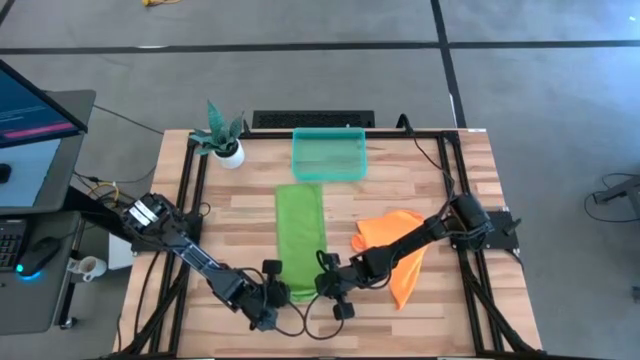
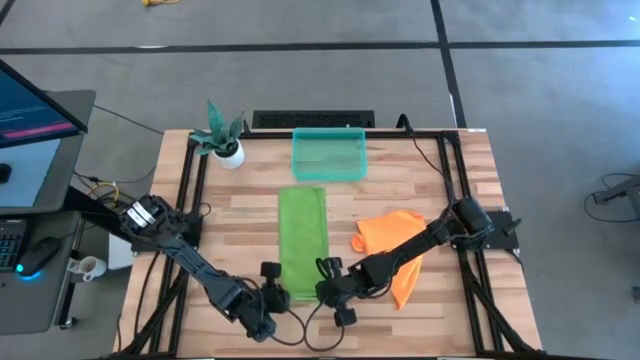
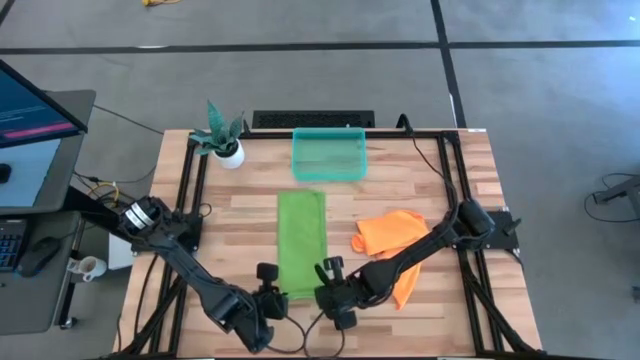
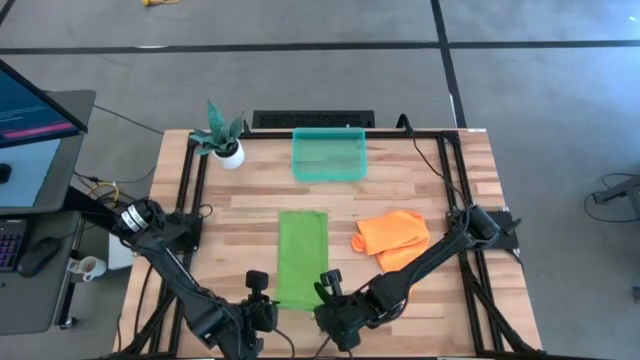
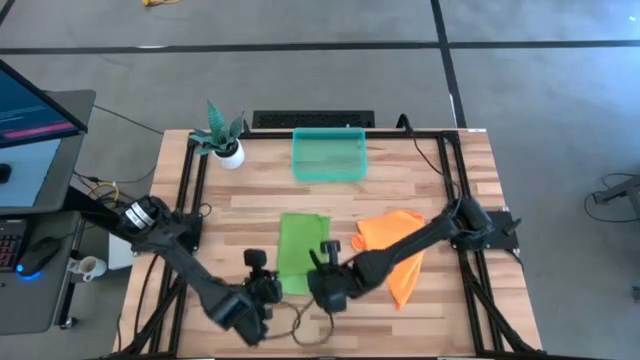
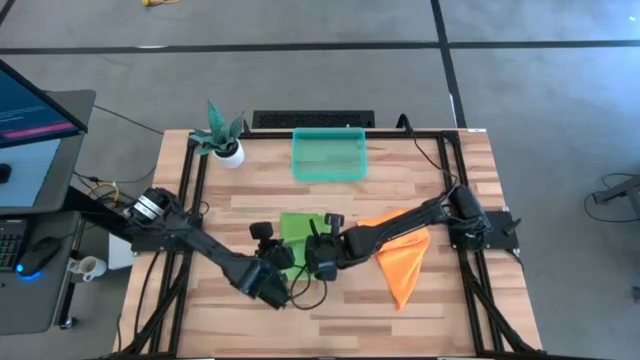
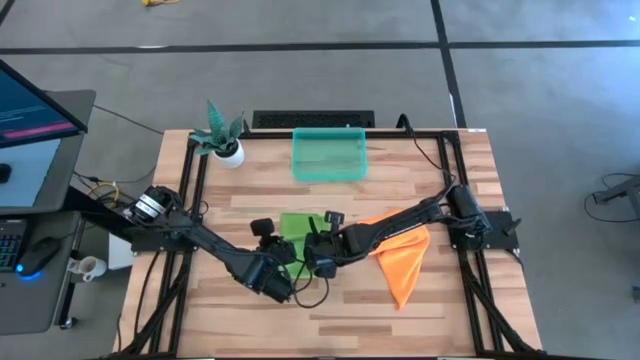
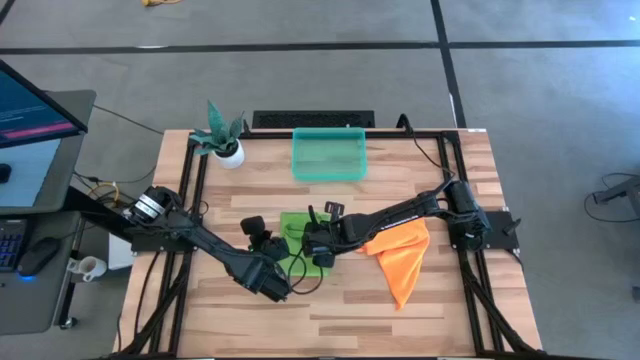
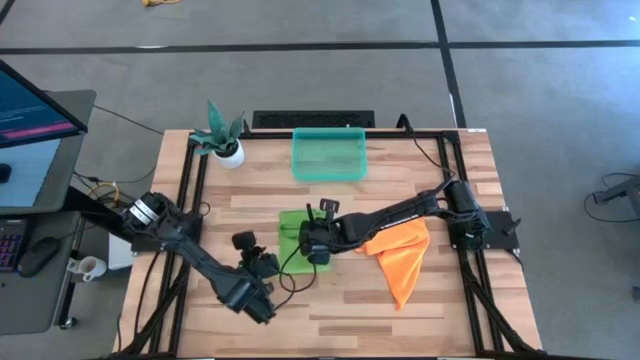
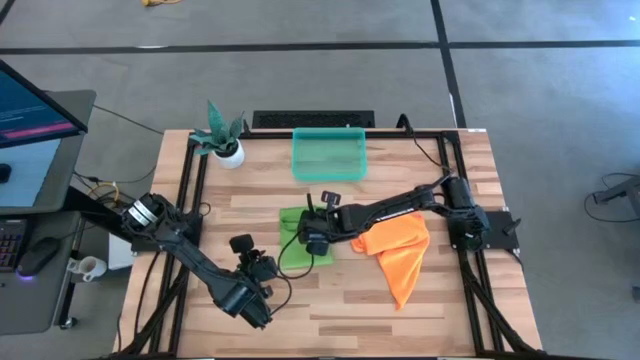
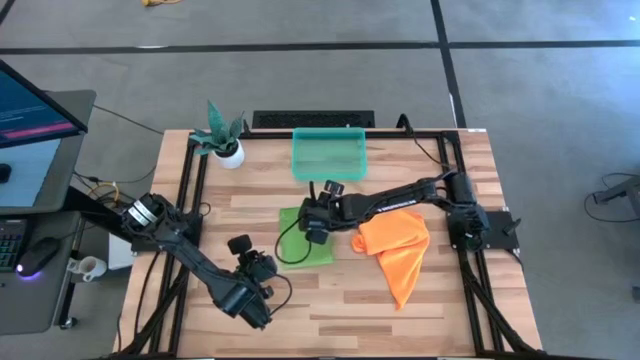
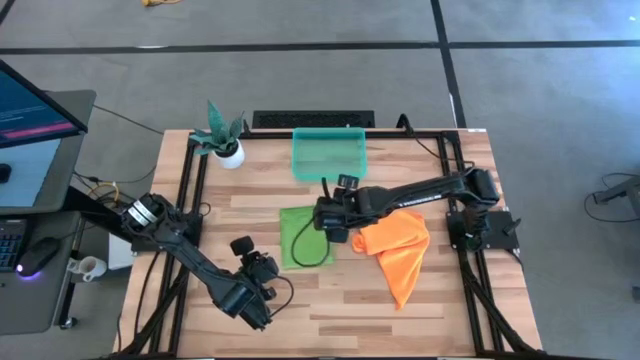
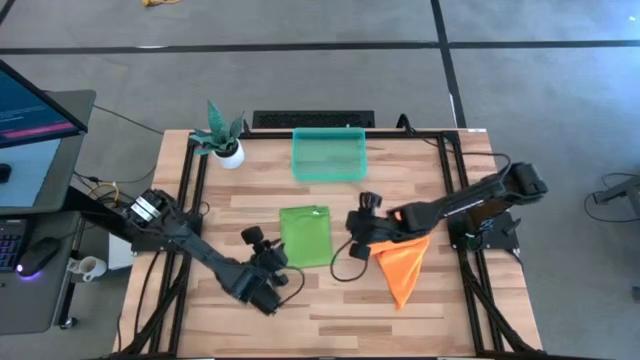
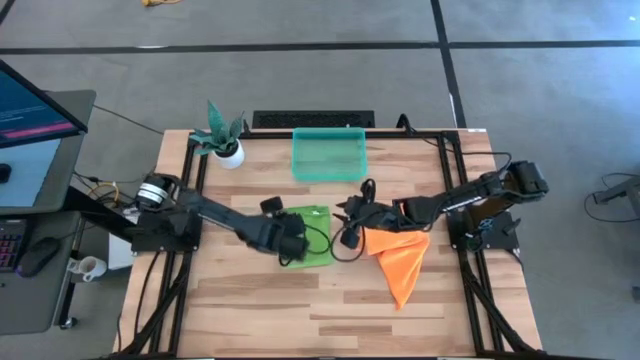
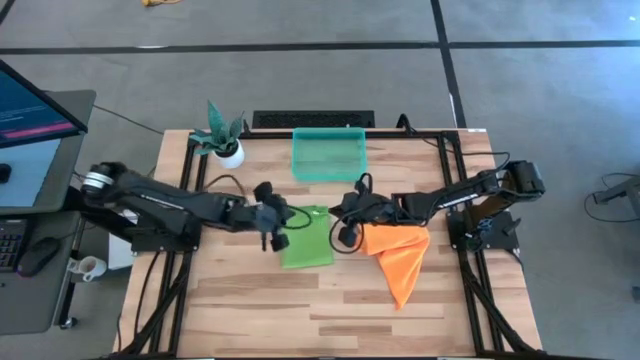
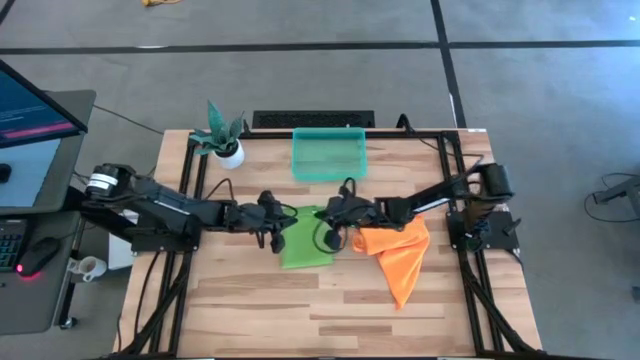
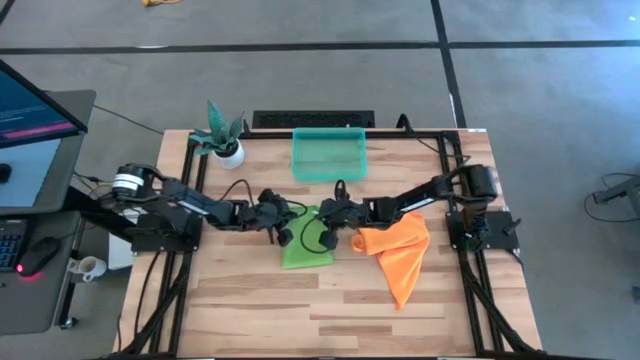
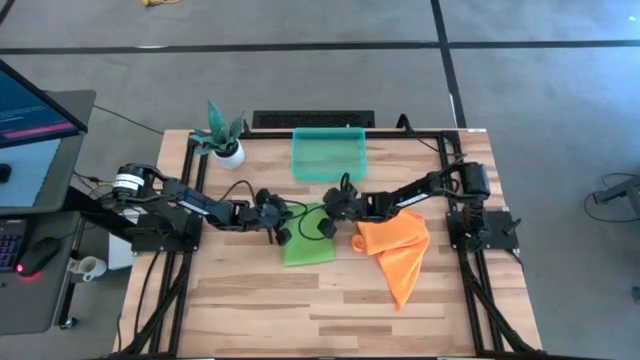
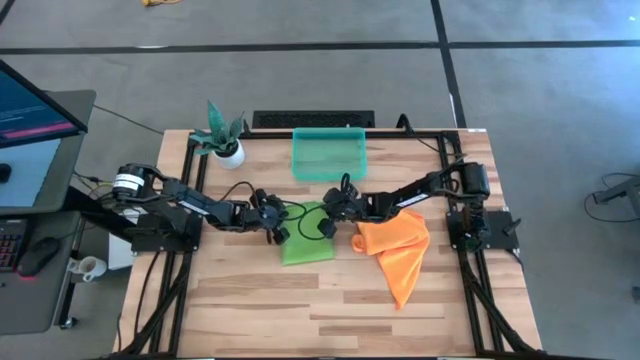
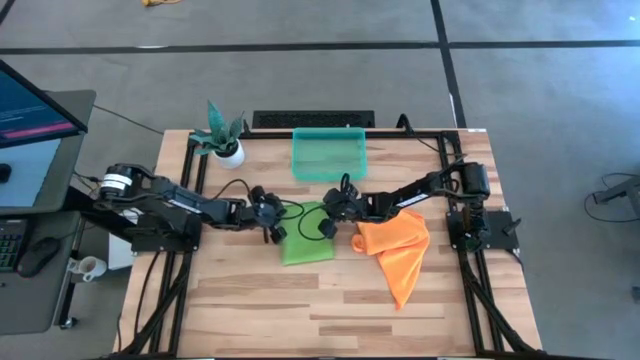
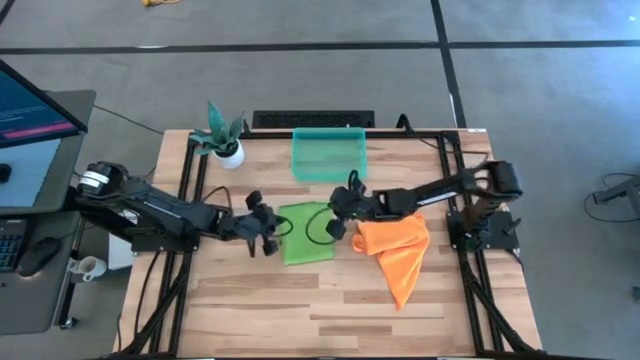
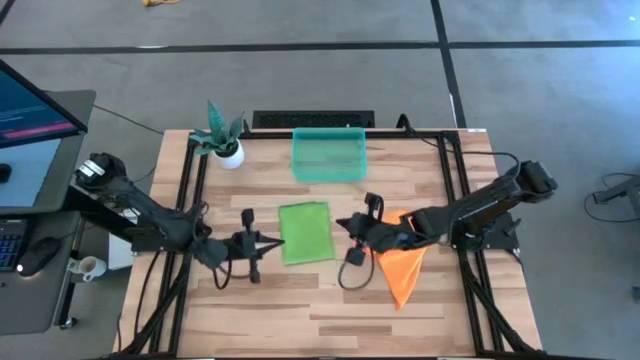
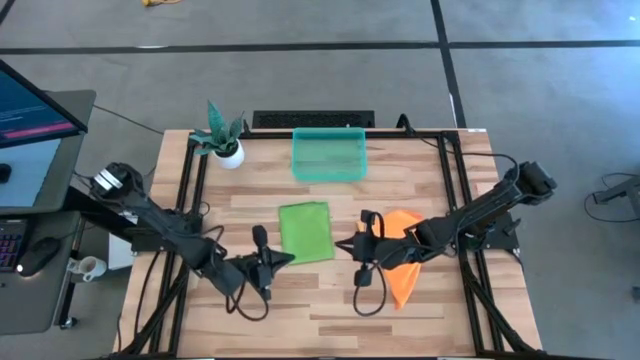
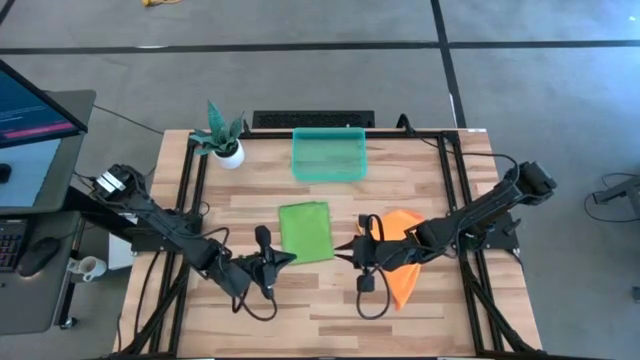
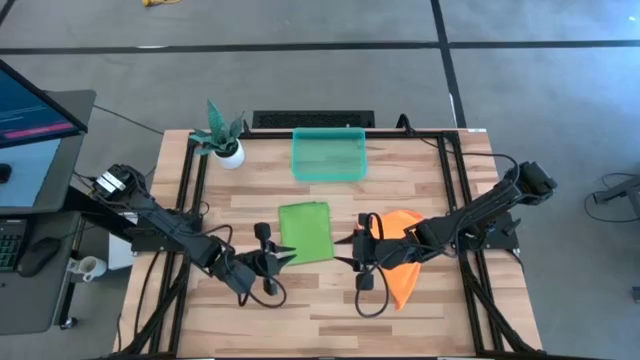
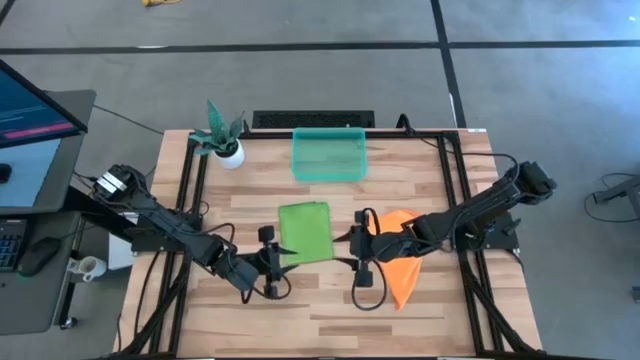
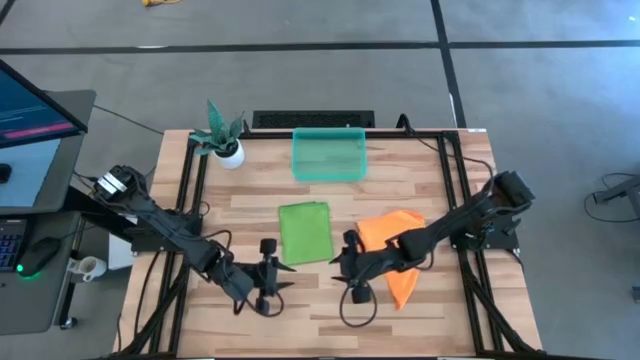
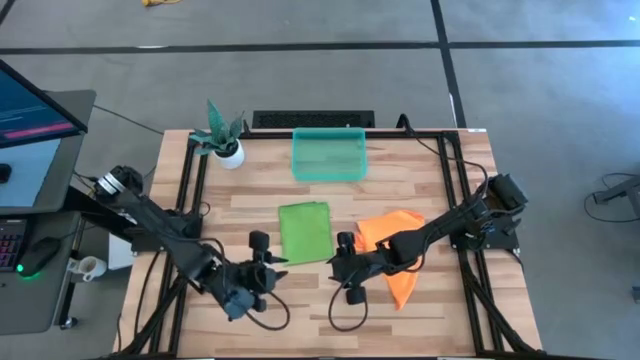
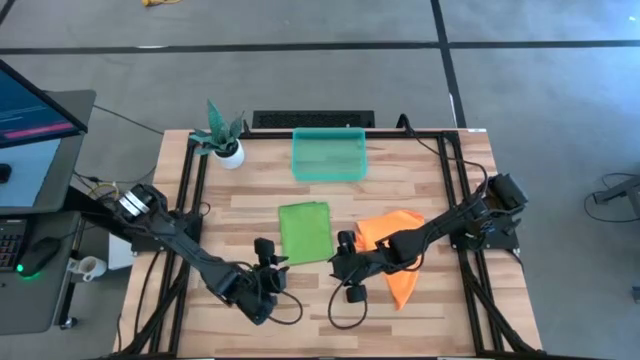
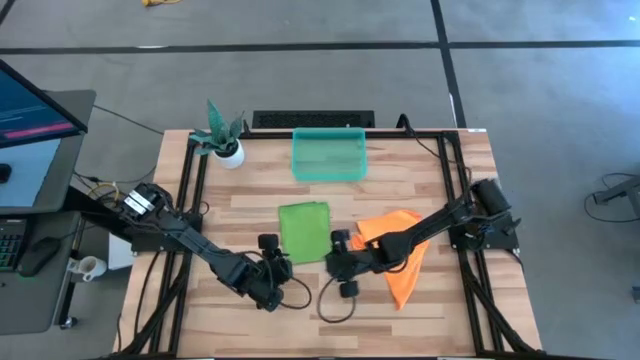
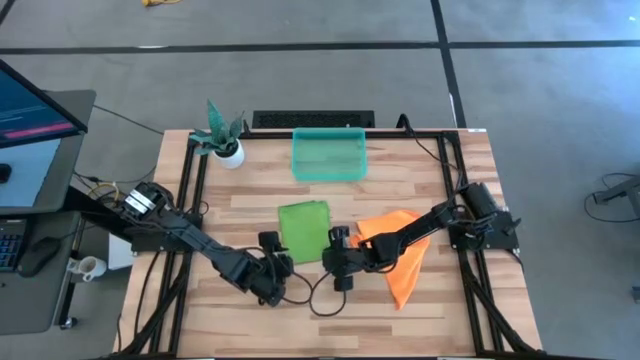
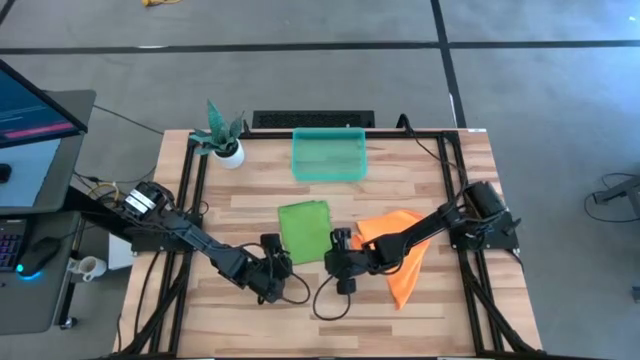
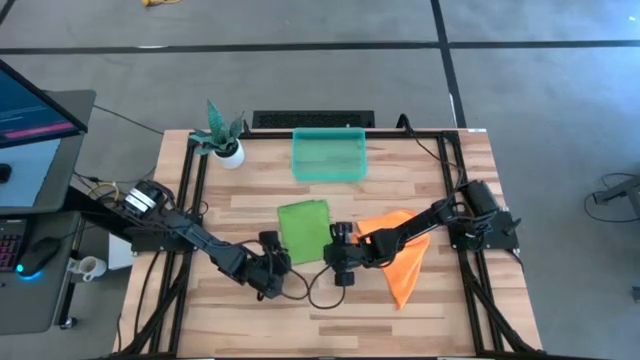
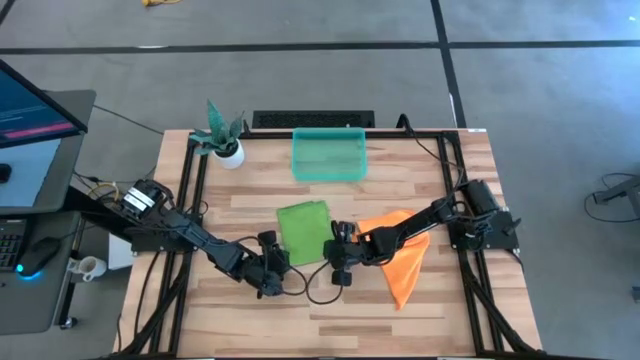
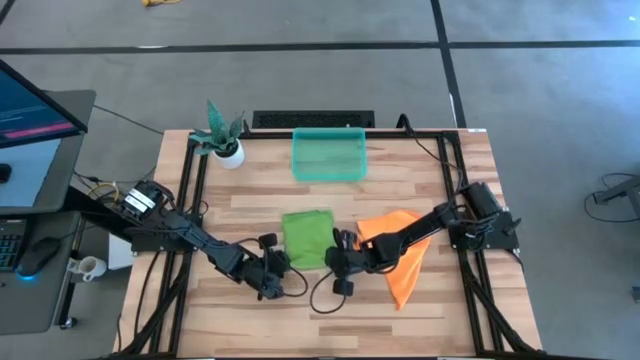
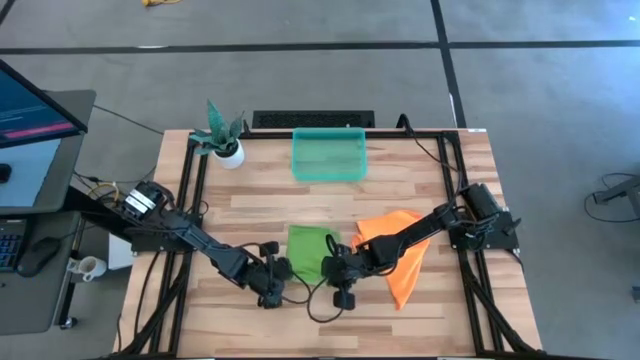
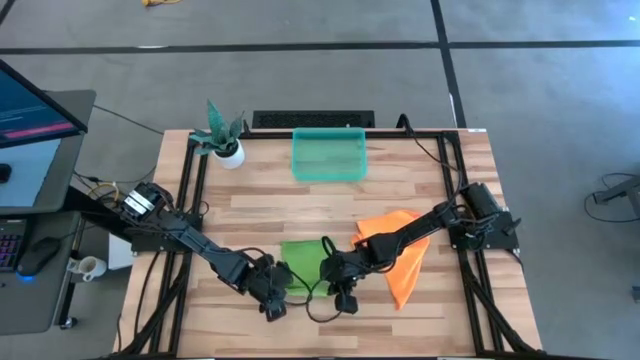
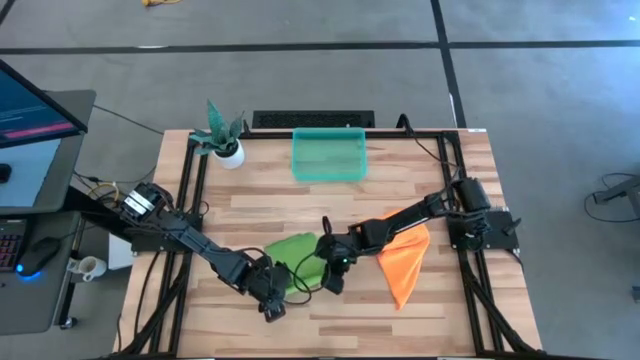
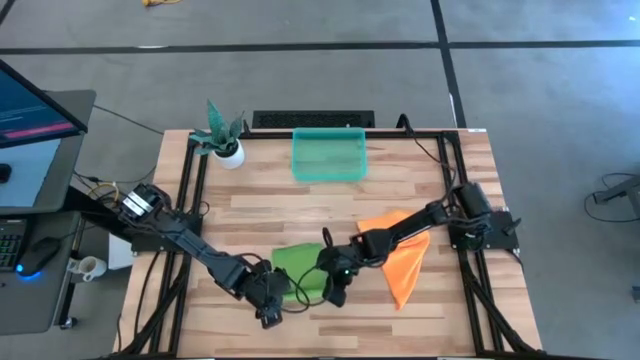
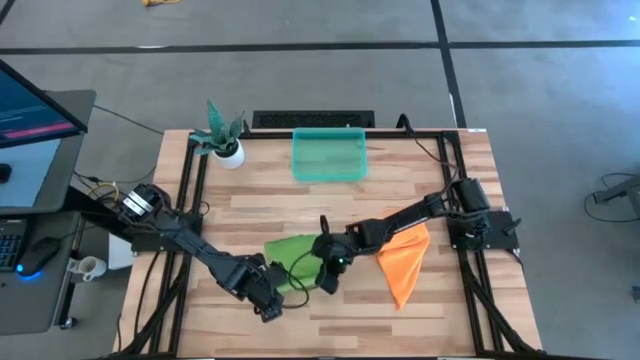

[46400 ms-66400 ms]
Task: Roll towel into tight, uniform cylinder
Roll the green microfiber towel

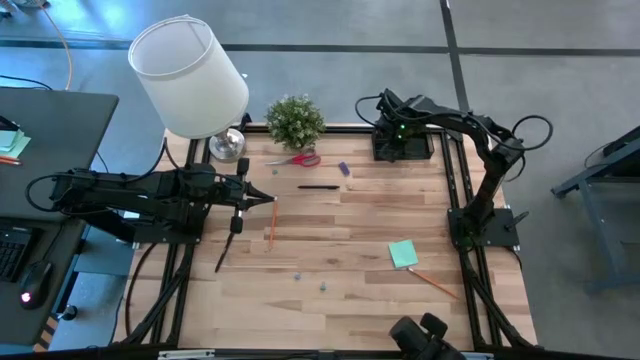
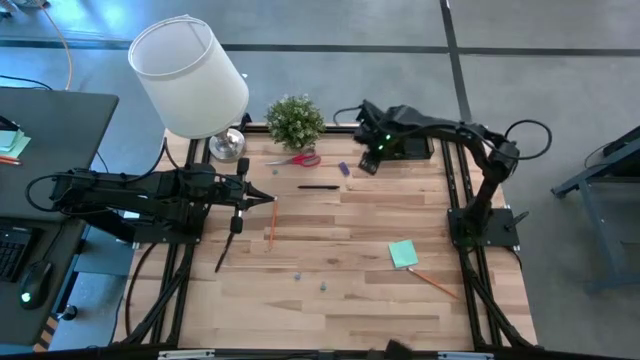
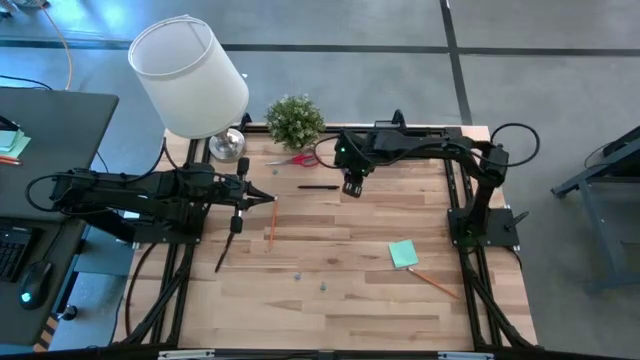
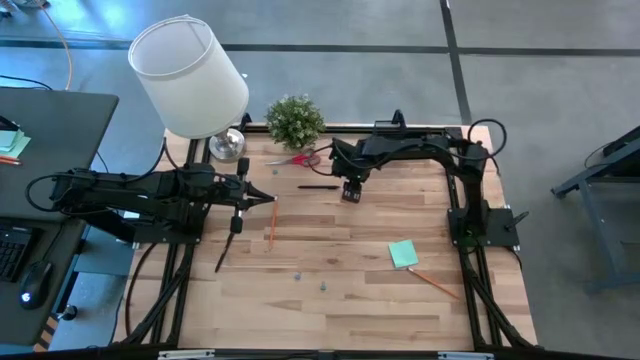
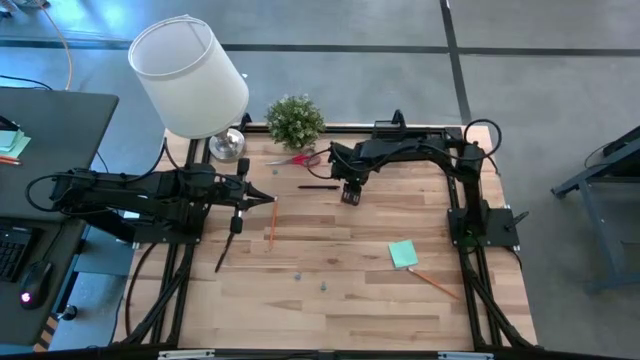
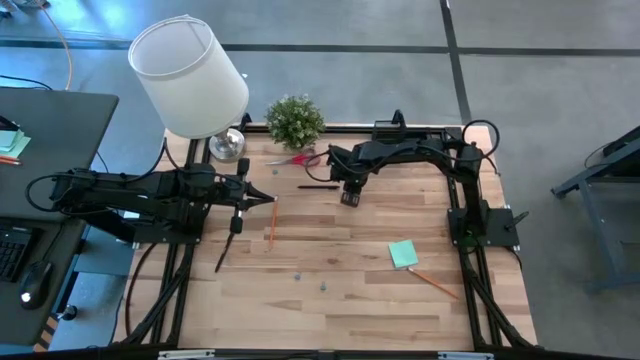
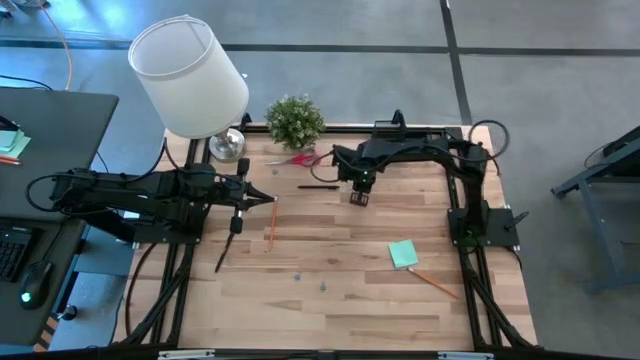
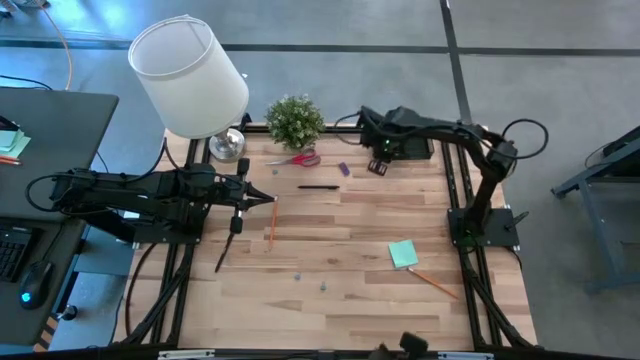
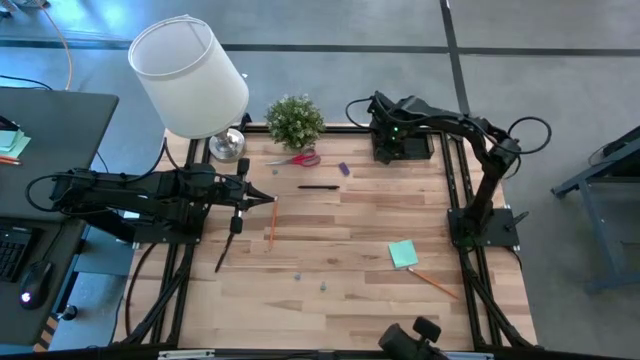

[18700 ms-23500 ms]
Task: Pick and place office supplies into organizer
Put the gray binder clip in the black desk organizer
